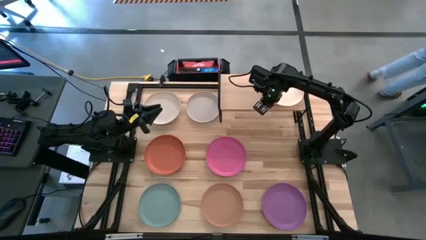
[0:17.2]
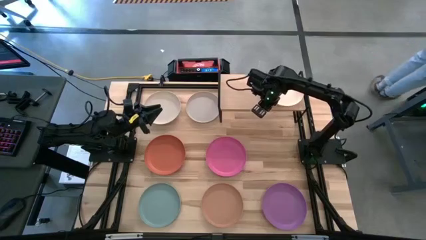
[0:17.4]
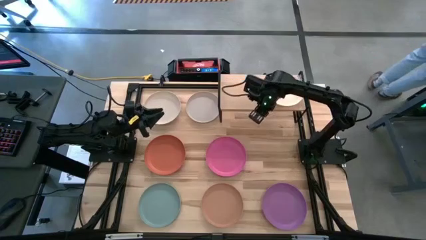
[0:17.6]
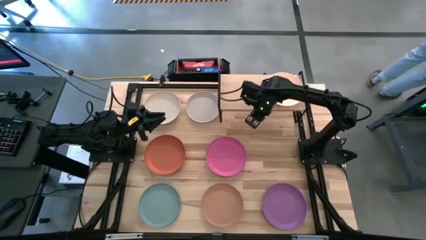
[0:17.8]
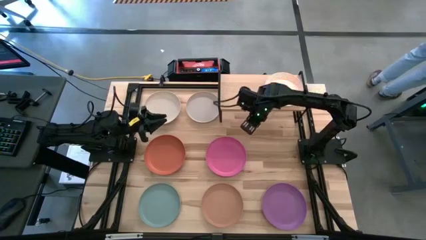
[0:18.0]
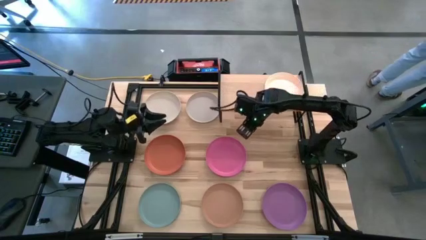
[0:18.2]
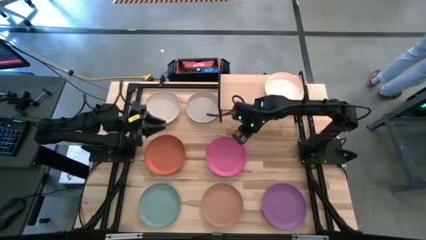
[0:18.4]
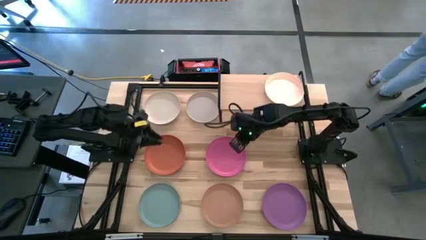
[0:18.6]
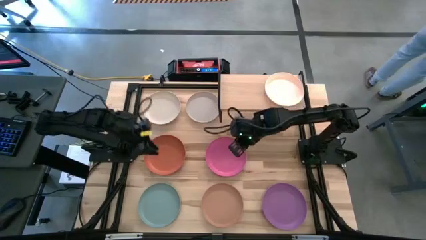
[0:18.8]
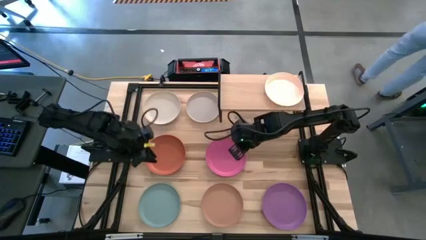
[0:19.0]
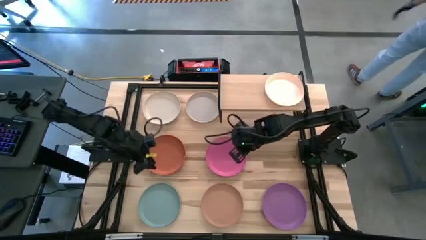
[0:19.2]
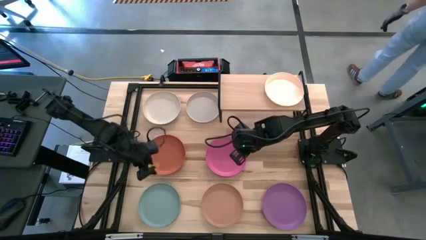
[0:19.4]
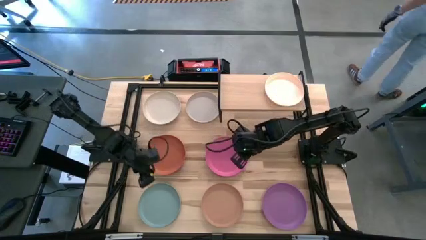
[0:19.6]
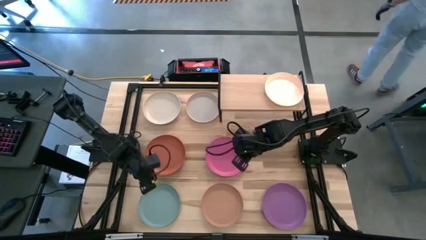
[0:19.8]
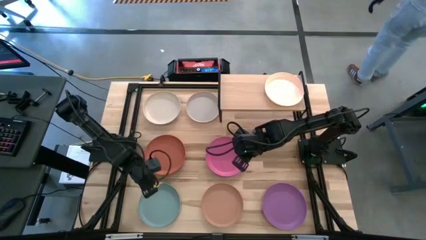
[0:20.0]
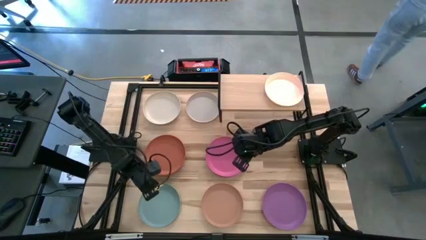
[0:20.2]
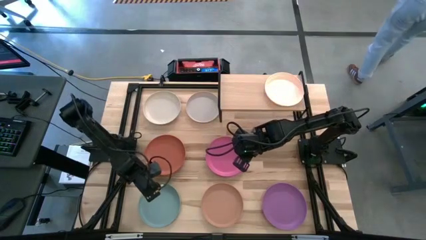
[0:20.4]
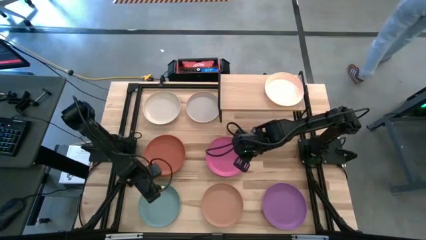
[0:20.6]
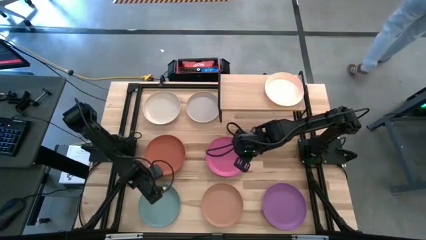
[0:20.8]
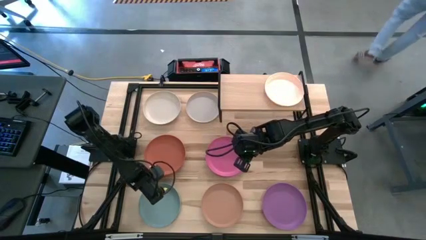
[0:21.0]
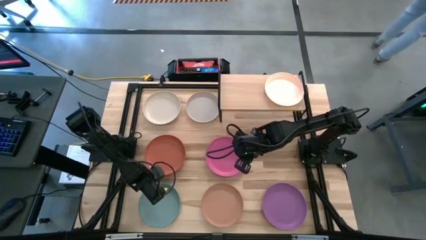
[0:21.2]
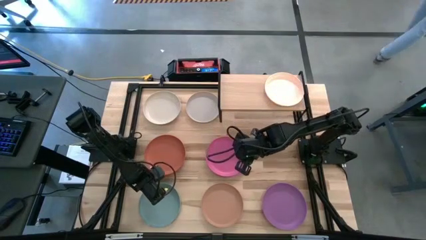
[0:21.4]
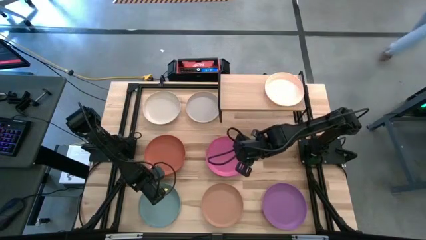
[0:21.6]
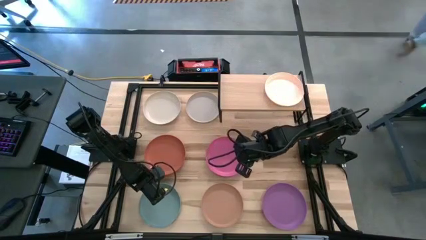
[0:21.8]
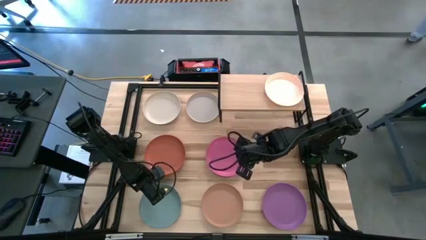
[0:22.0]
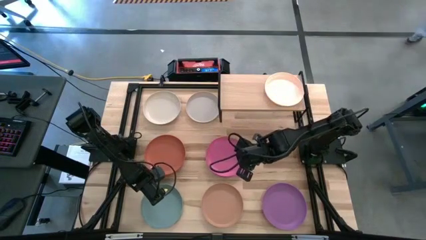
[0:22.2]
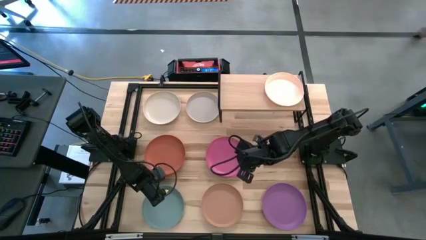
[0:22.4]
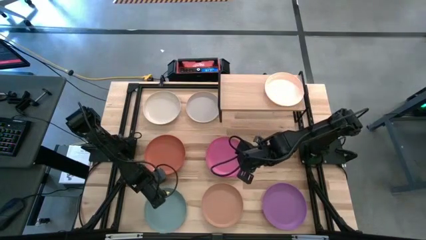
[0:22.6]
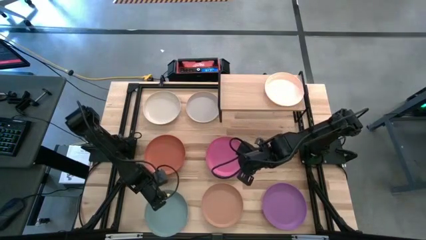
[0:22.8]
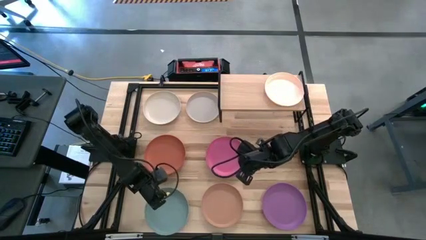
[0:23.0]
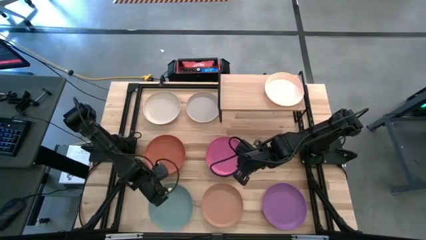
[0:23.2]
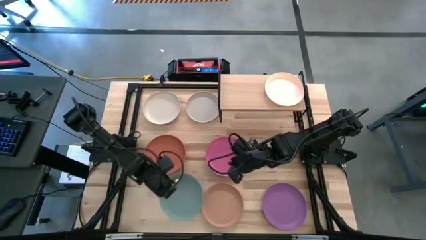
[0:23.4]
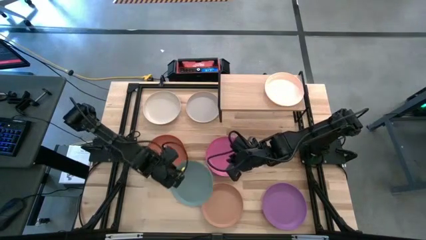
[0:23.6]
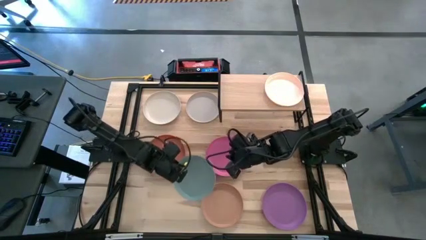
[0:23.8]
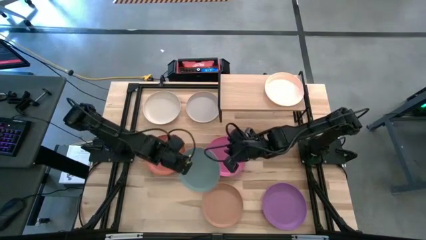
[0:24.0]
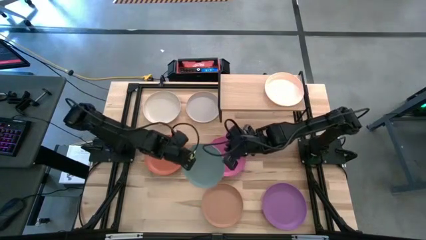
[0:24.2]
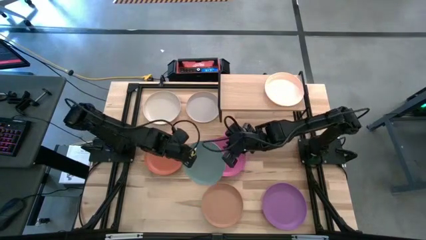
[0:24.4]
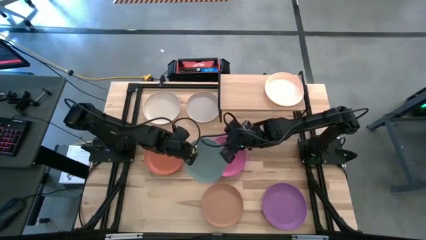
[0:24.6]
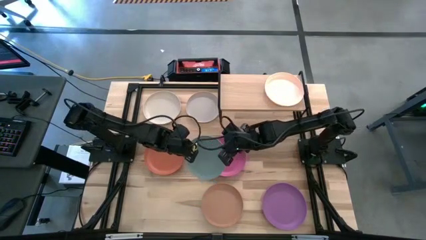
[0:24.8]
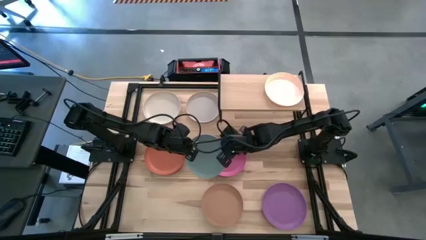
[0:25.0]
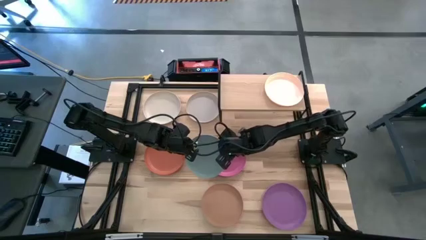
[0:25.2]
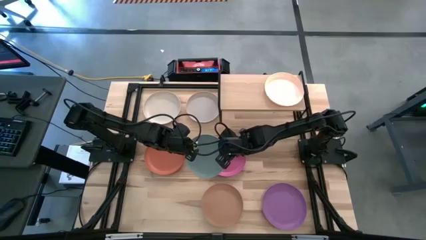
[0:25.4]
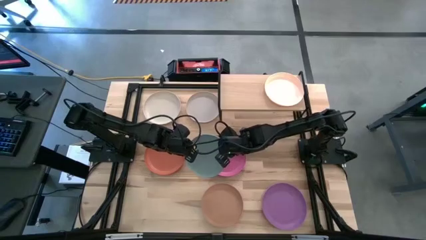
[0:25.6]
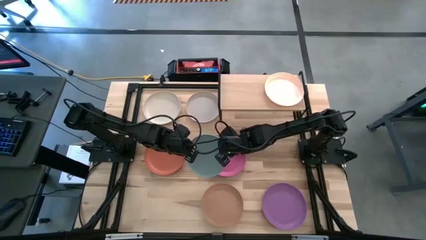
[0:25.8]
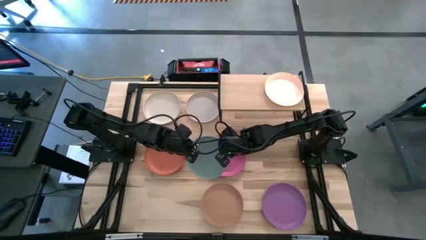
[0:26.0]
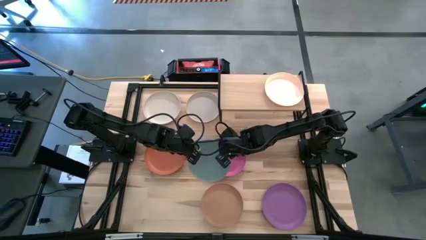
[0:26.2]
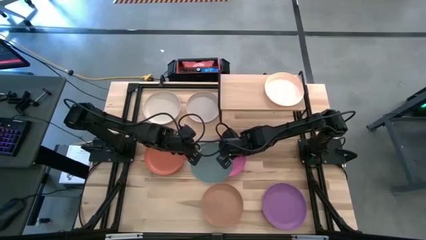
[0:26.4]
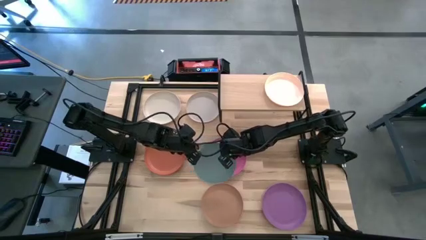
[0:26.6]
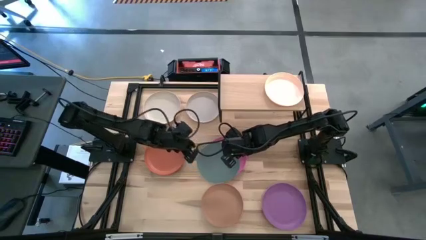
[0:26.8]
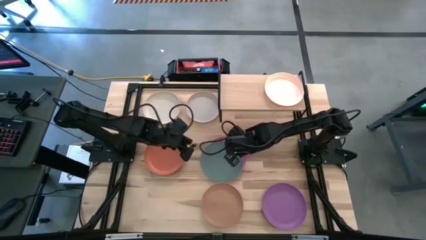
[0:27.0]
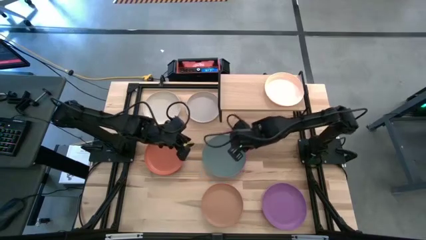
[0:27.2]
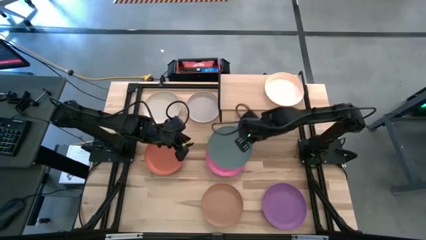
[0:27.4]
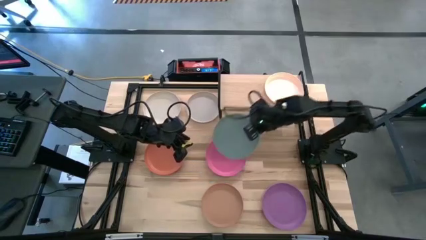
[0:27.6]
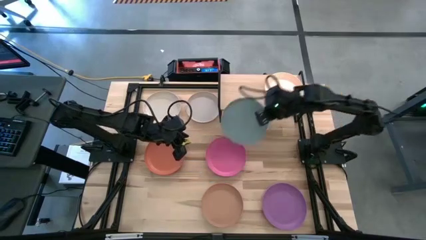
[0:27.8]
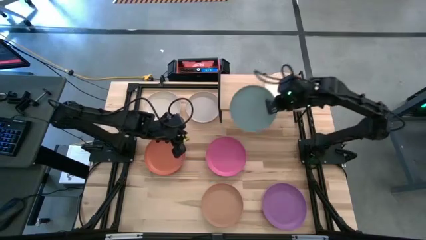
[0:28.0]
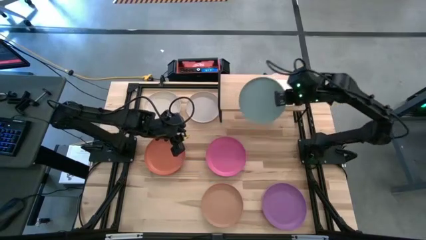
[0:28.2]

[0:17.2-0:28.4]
Task: Place and stack plates onto a shelf
Stack the blue plate on top of the white plate on the shelf
